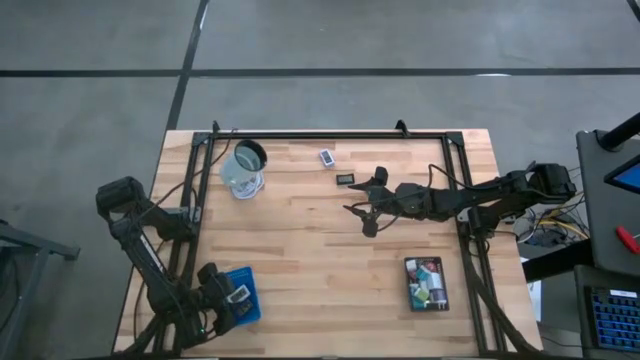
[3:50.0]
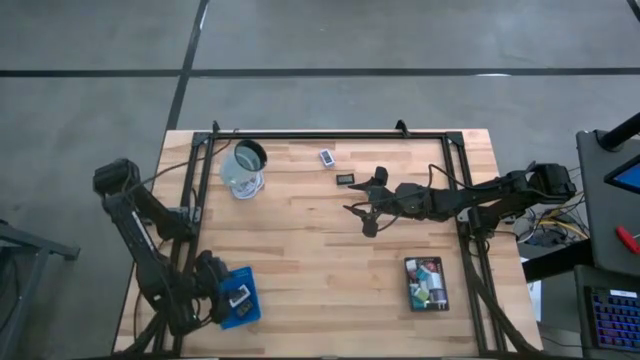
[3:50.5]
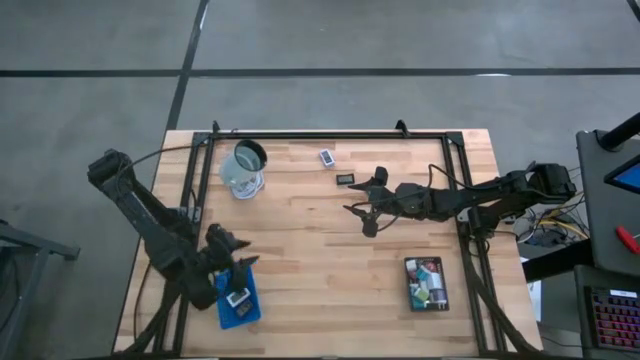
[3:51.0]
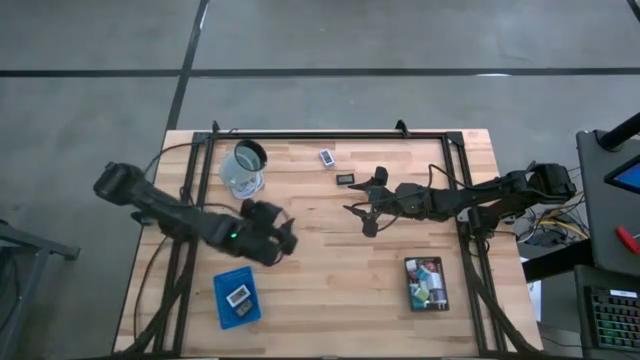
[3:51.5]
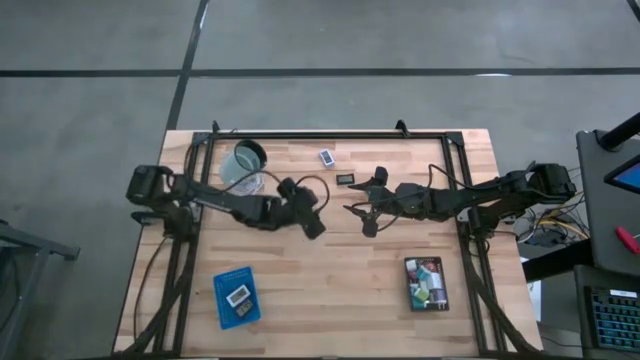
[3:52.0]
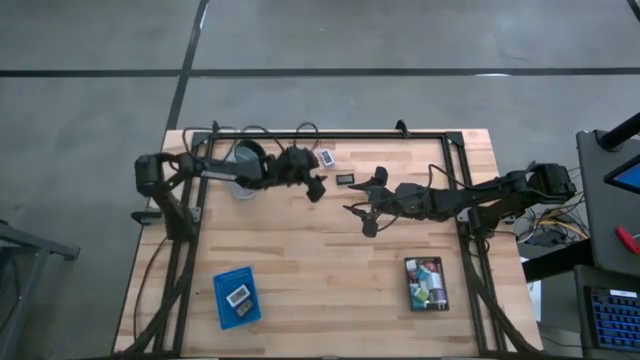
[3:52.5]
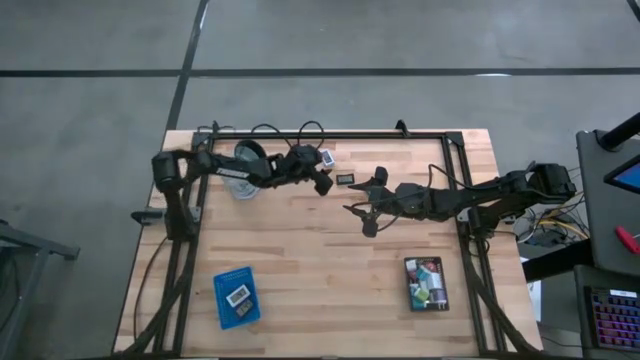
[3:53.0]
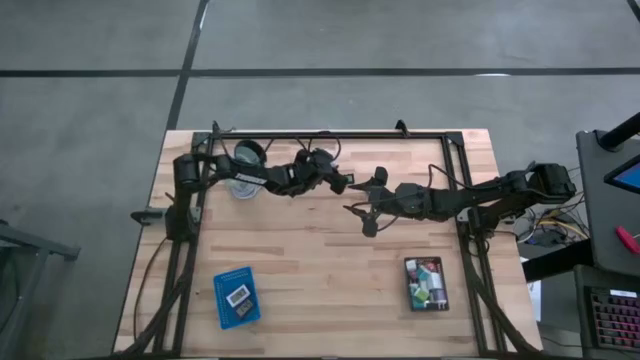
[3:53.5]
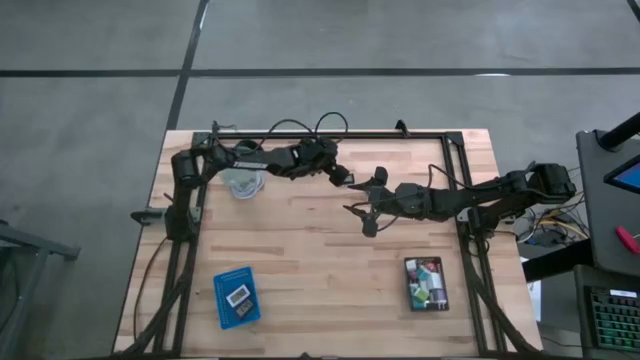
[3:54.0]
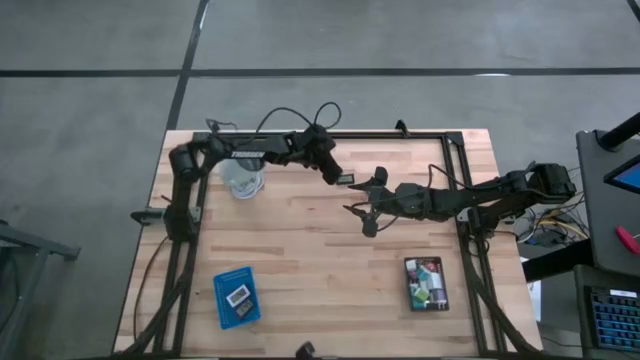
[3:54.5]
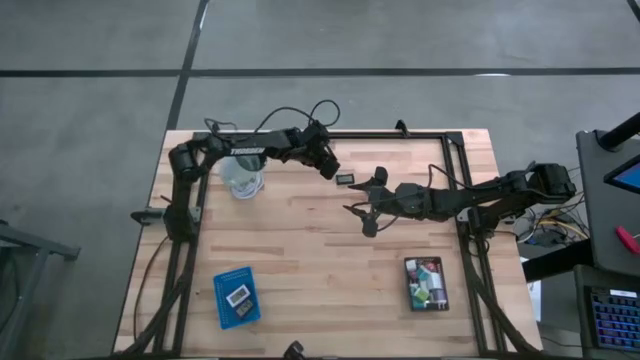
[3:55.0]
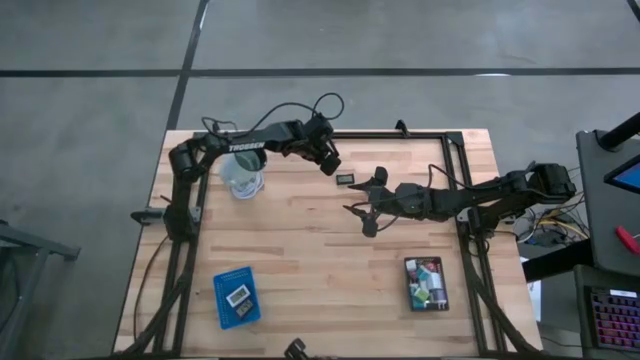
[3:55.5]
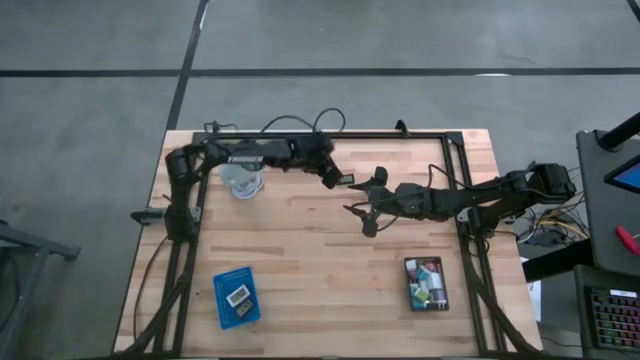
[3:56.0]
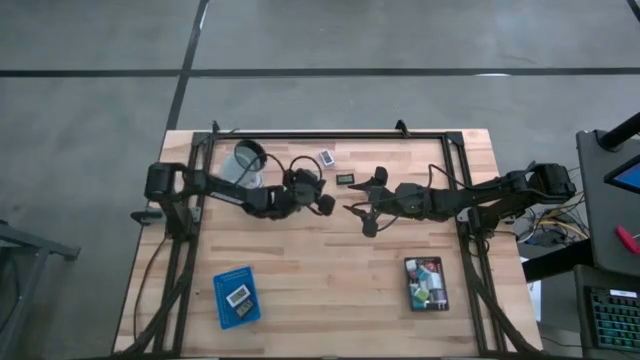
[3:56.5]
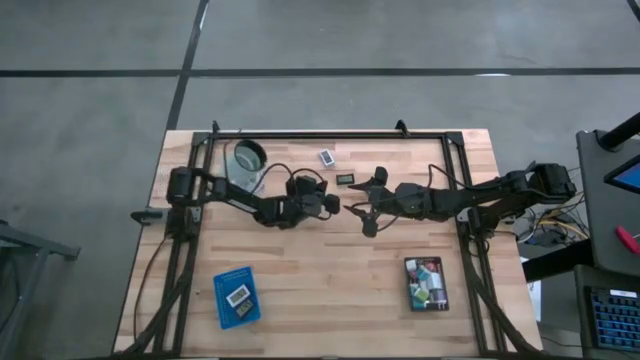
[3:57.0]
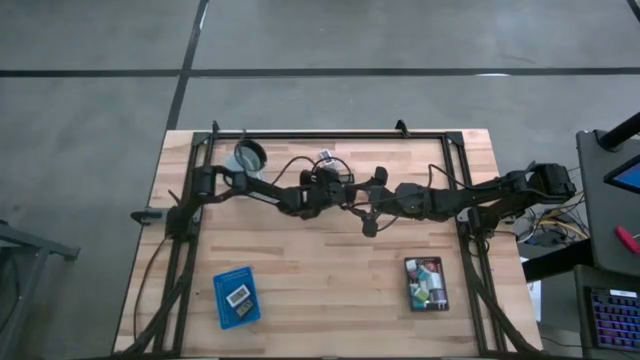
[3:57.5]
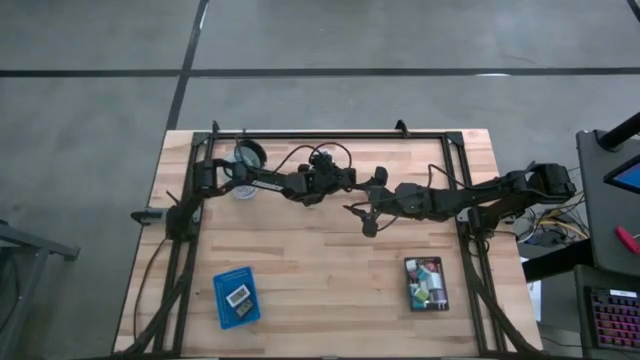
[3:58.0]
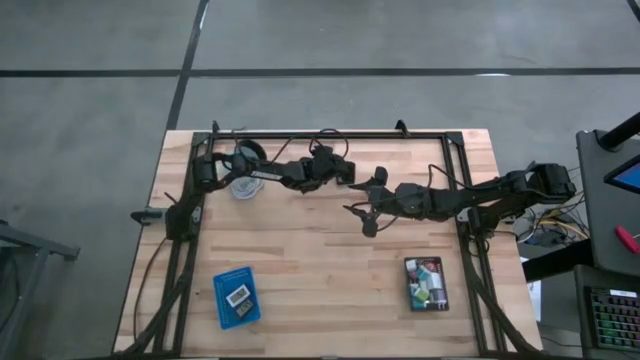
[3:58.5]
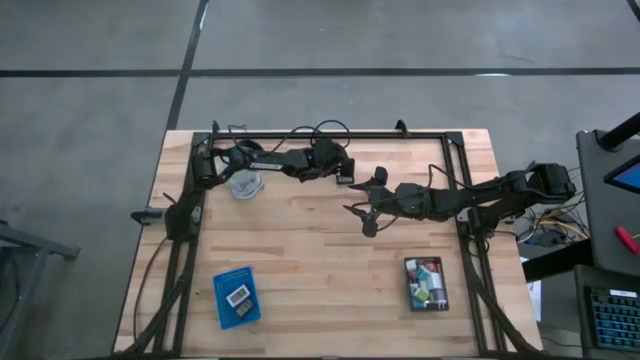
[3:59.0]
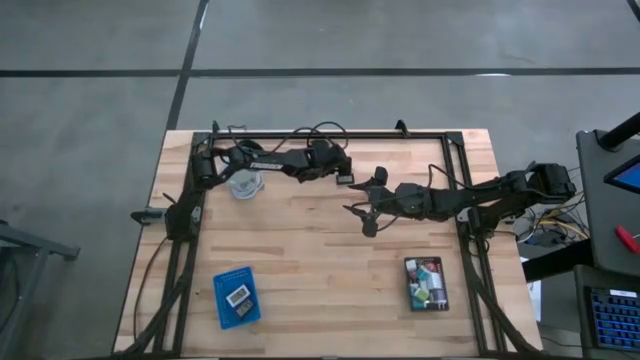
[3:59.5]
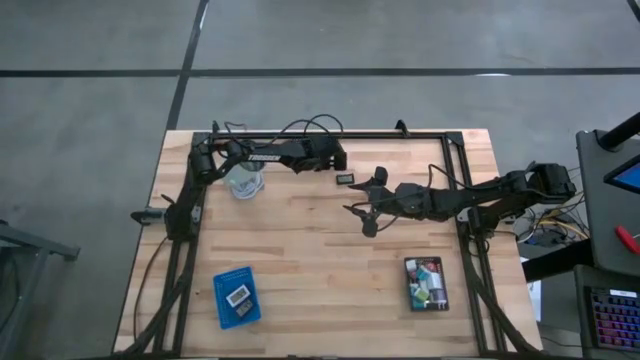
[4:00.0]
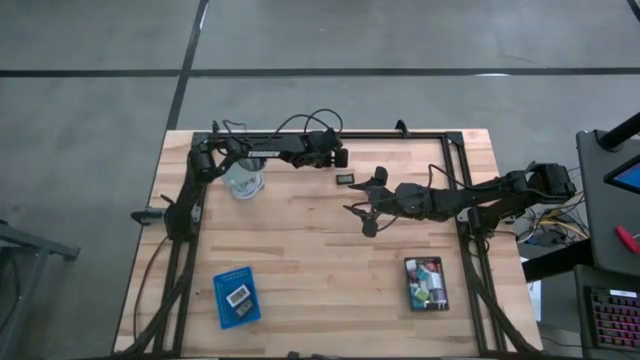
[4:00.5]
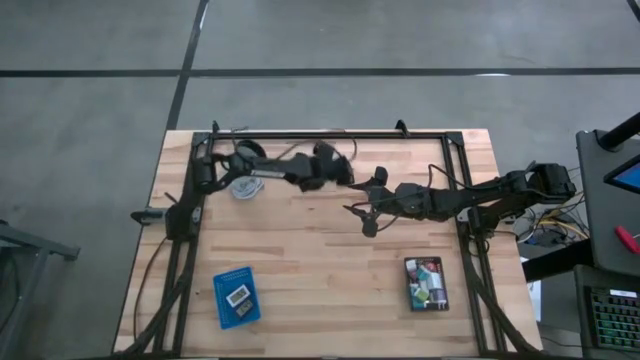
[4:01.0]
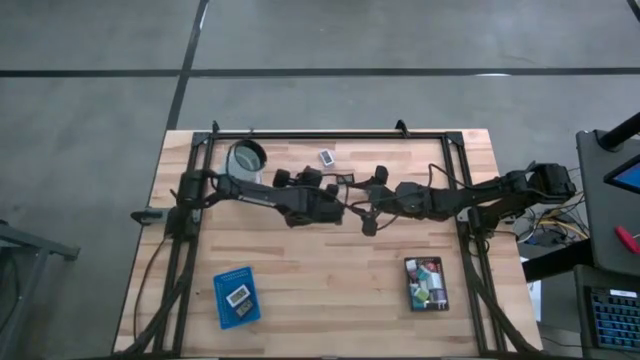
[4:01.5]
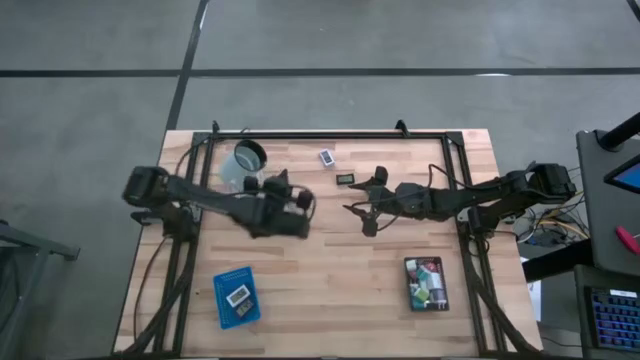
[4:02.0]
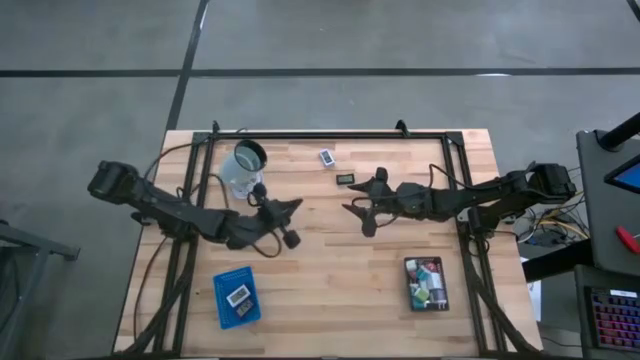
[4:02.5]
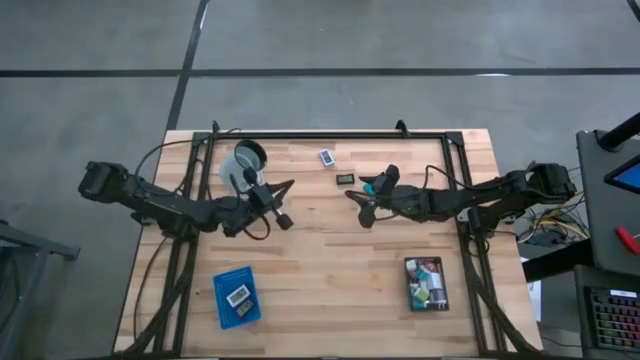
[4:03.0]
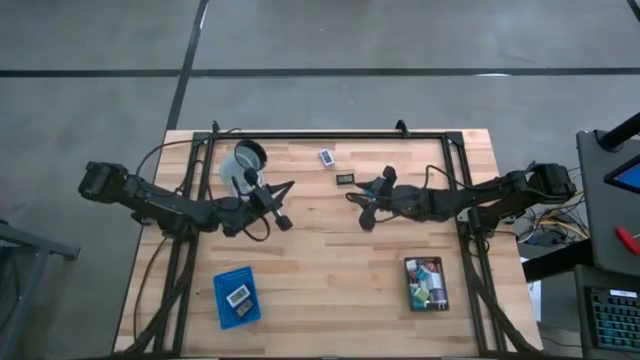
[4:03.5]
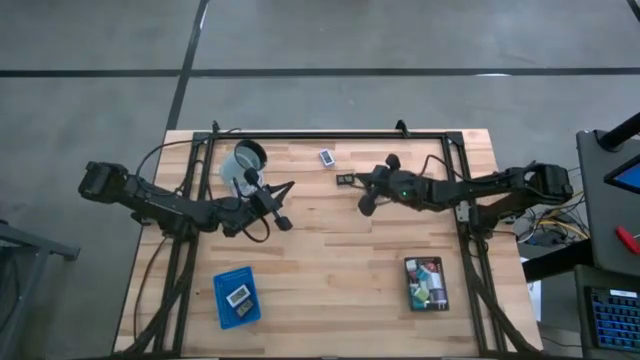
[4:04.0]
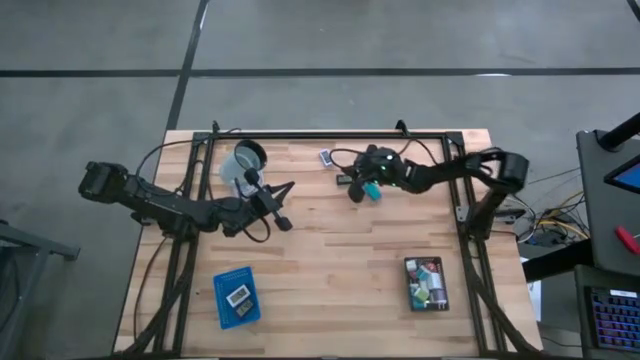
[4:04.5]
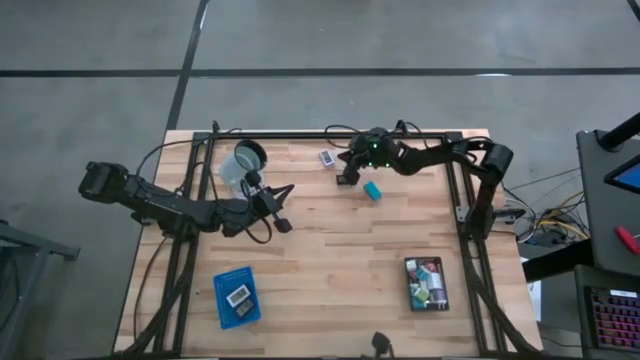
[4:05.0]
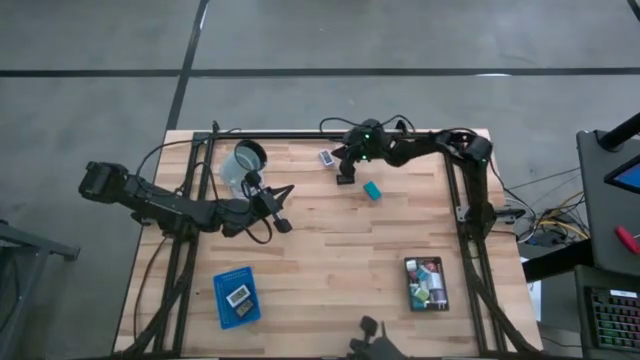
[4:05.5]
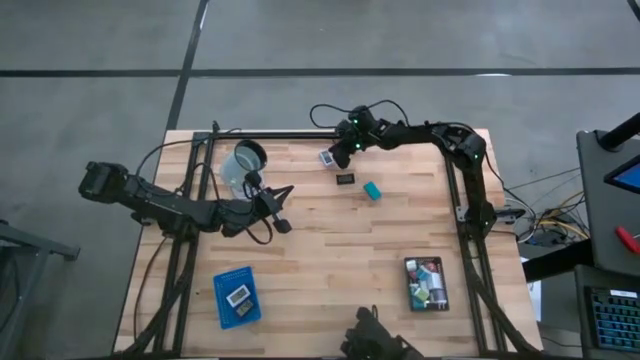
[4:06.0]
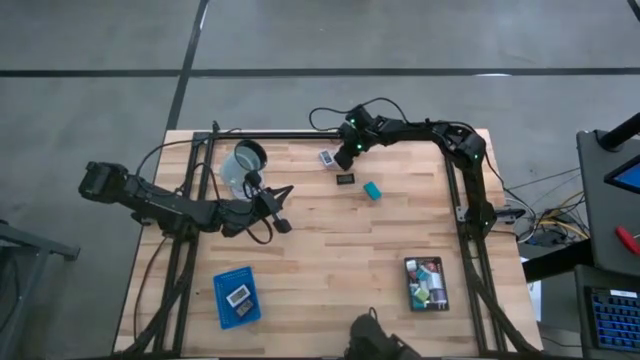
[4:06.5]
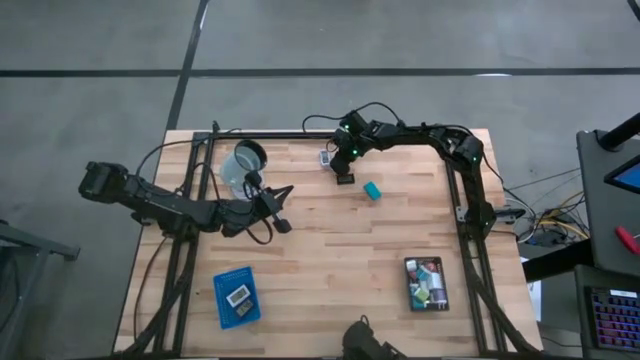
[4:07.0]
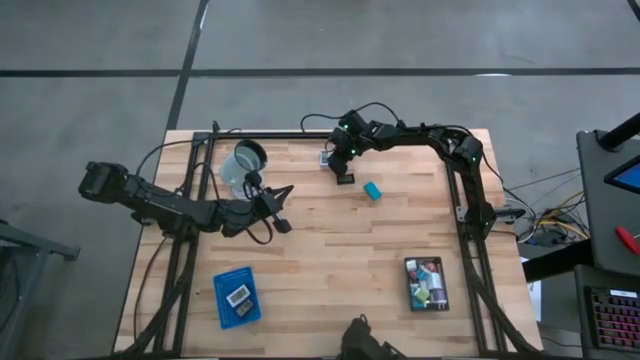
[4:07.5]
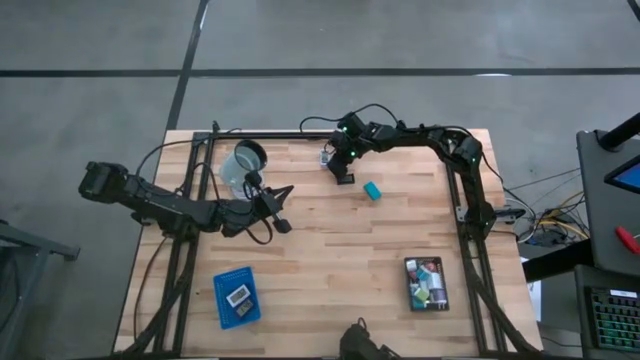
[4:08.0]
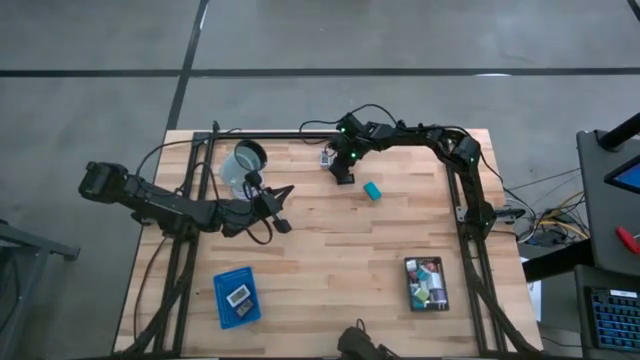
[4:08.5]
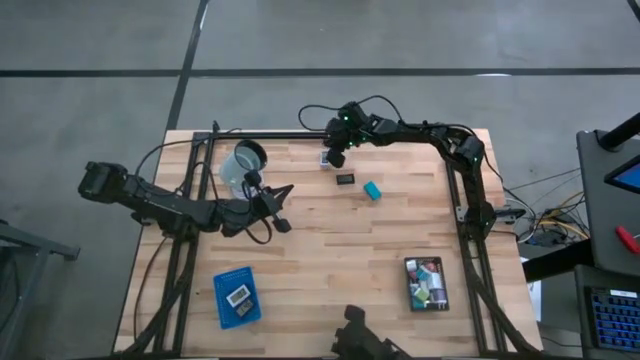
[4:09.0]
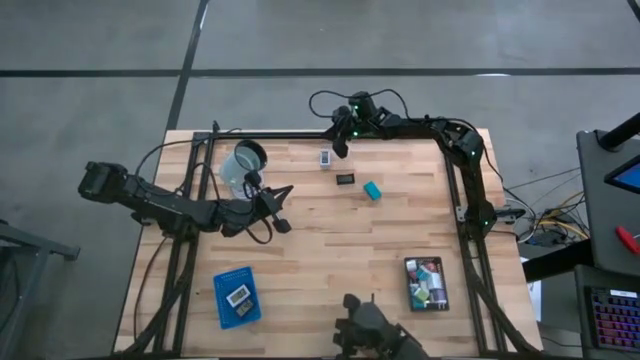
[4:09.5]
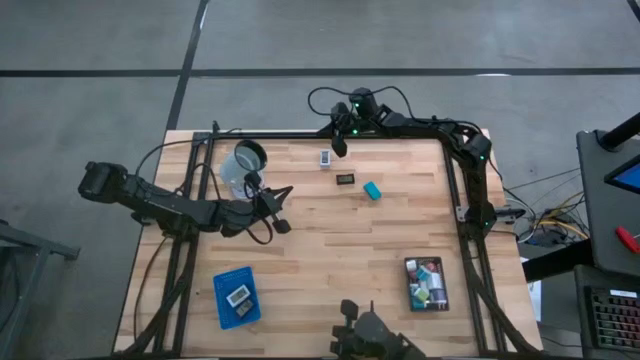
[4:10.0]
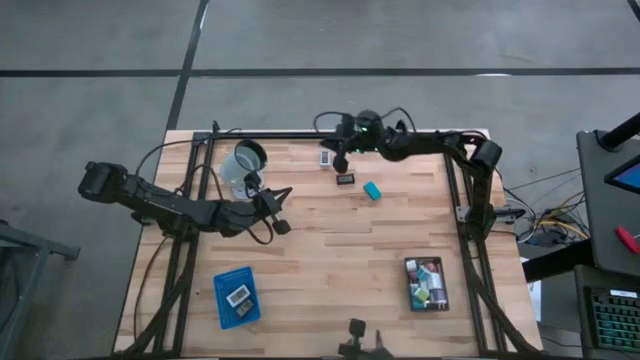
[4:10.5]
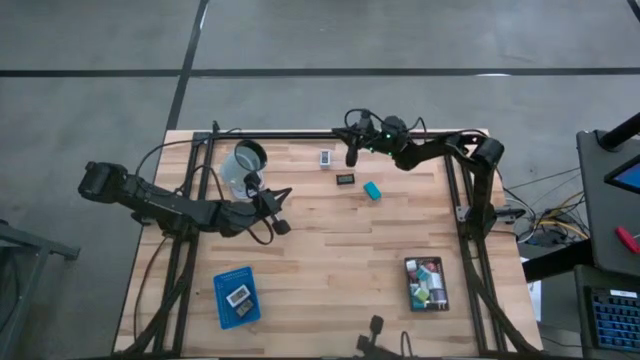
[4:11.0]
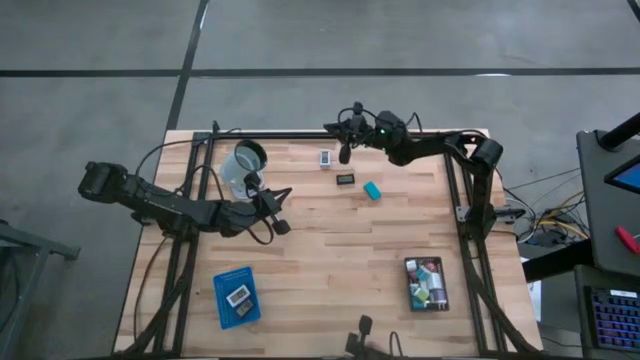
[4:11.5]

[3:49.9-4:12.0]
Task: Pick & Place Office items
Put the white digital clock into the blue bin
